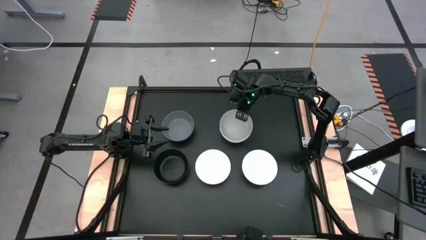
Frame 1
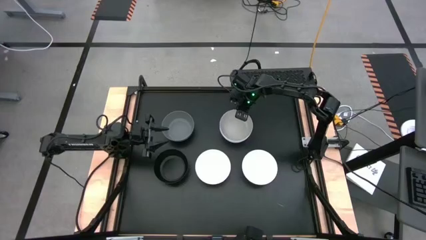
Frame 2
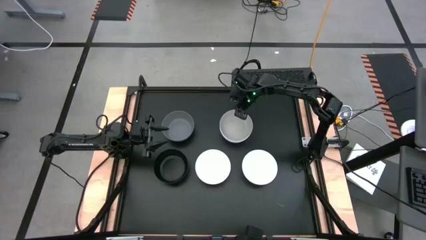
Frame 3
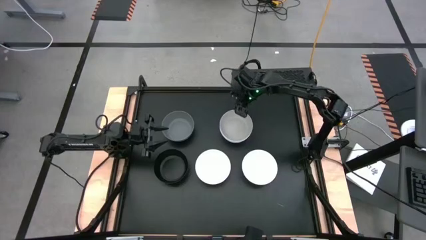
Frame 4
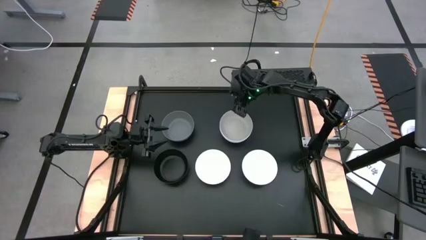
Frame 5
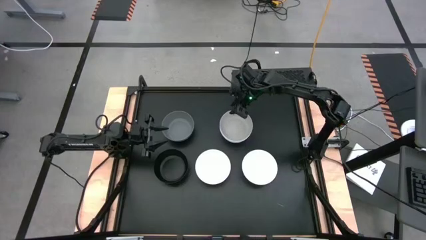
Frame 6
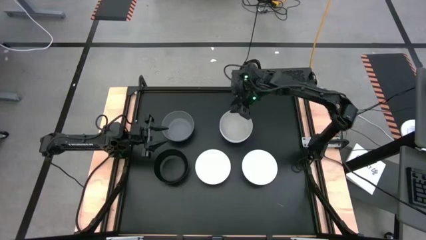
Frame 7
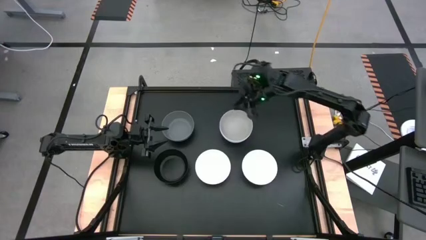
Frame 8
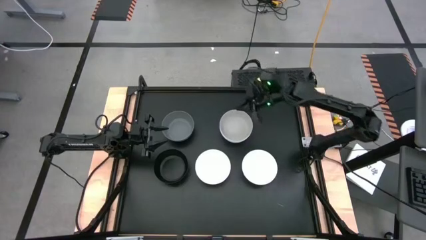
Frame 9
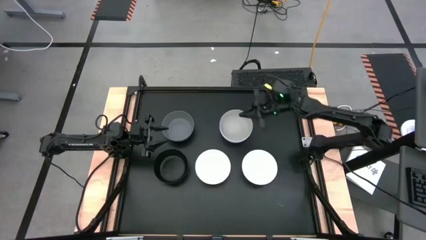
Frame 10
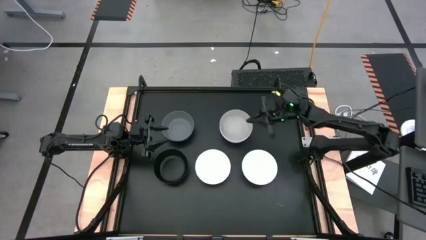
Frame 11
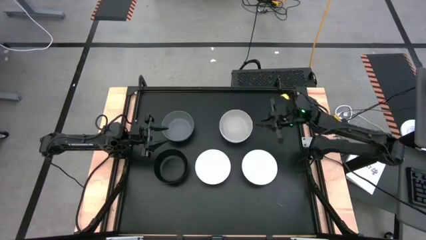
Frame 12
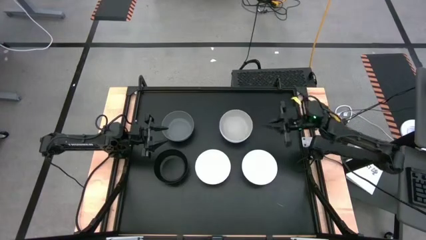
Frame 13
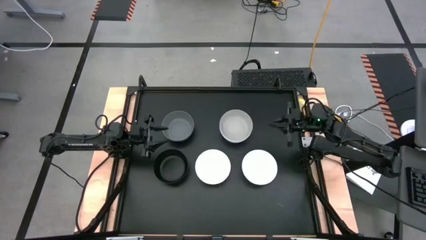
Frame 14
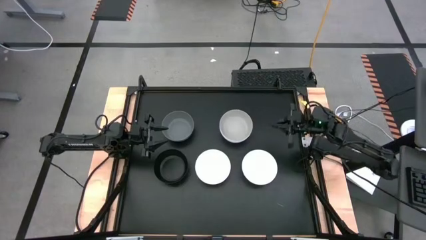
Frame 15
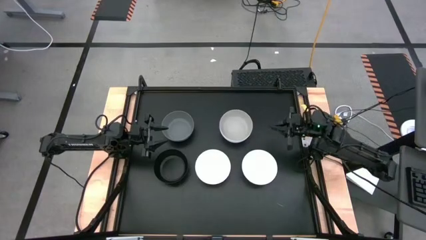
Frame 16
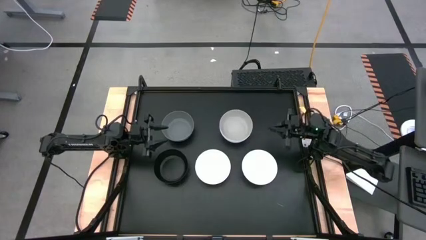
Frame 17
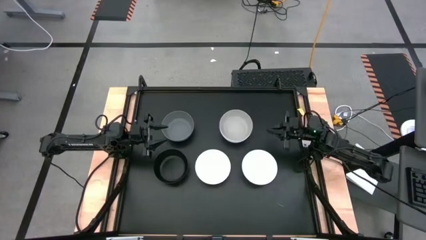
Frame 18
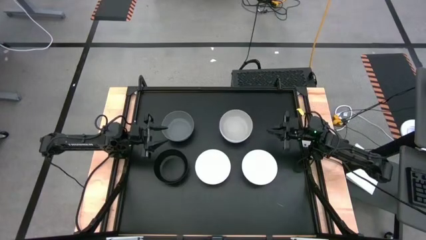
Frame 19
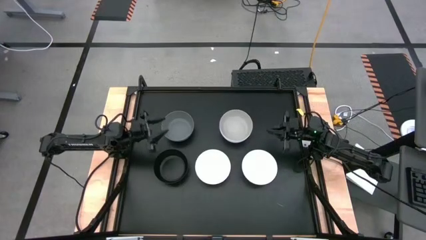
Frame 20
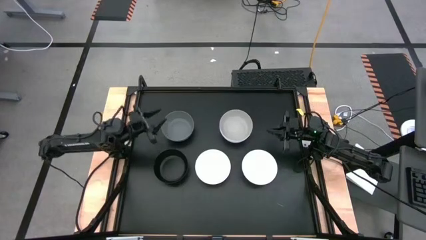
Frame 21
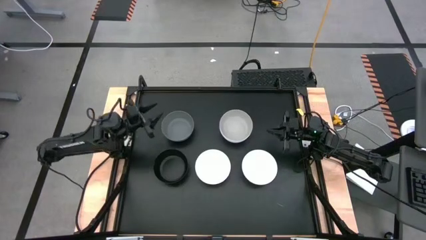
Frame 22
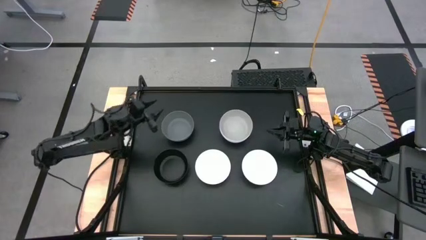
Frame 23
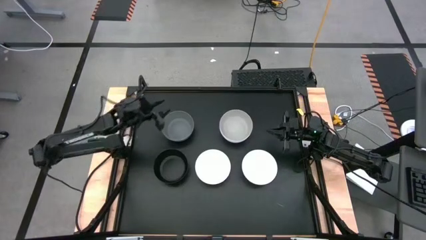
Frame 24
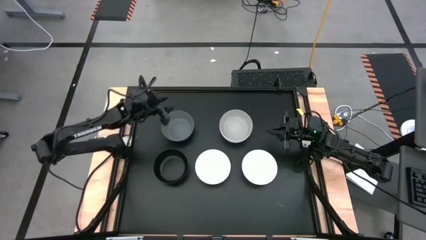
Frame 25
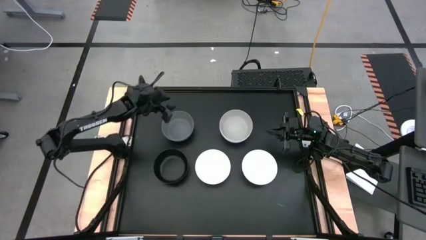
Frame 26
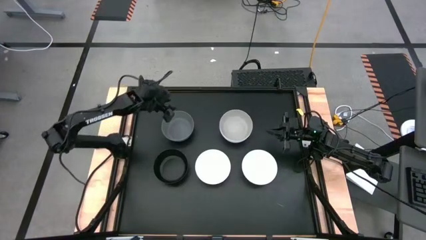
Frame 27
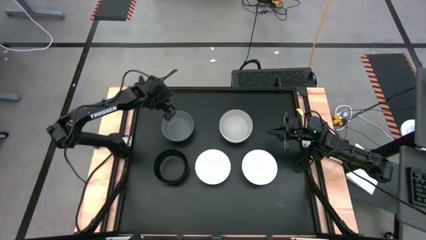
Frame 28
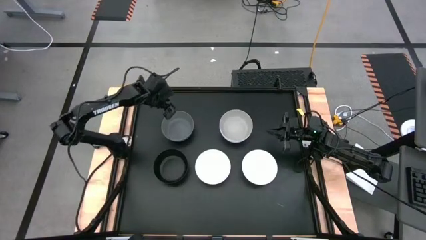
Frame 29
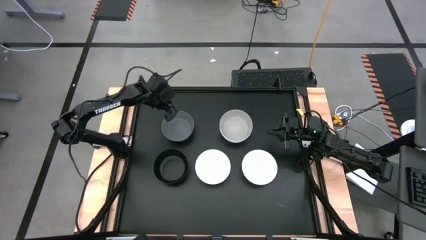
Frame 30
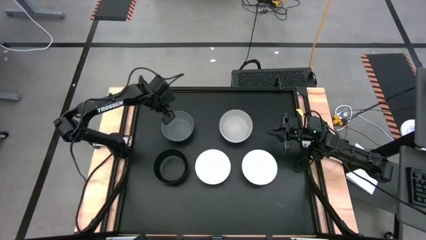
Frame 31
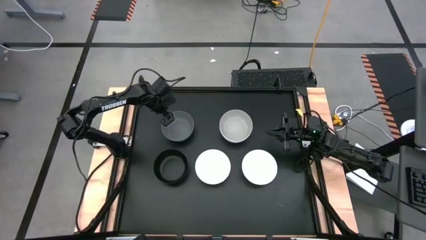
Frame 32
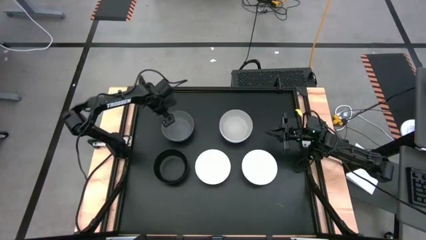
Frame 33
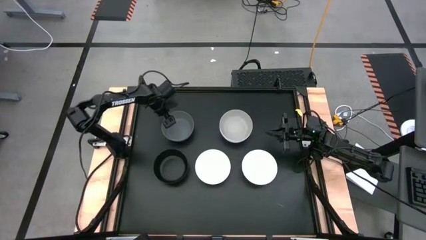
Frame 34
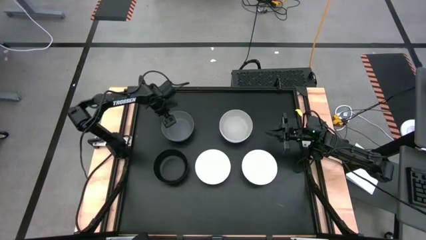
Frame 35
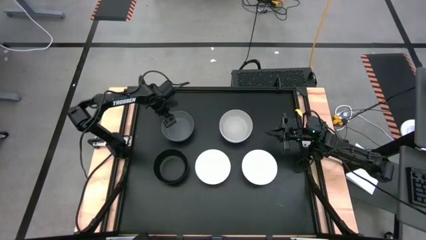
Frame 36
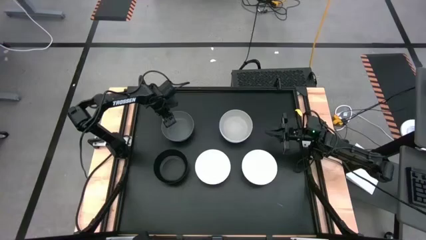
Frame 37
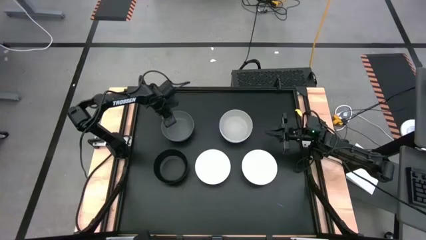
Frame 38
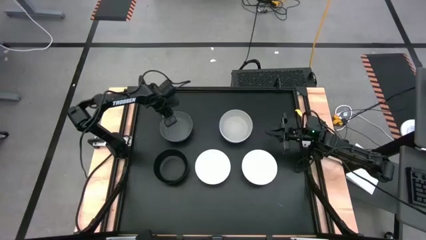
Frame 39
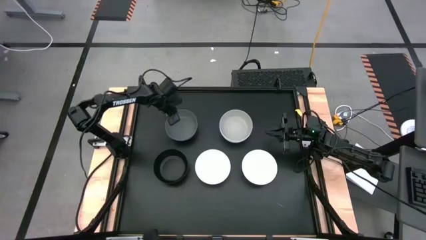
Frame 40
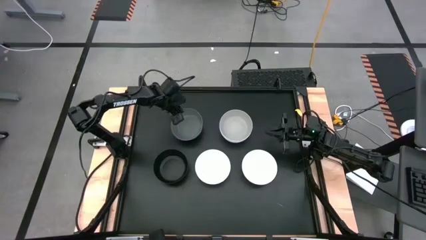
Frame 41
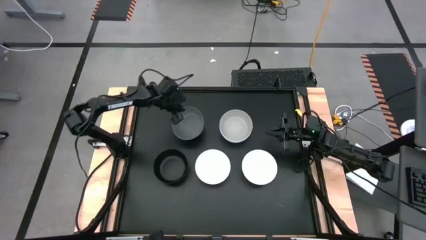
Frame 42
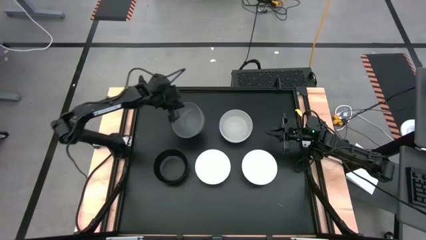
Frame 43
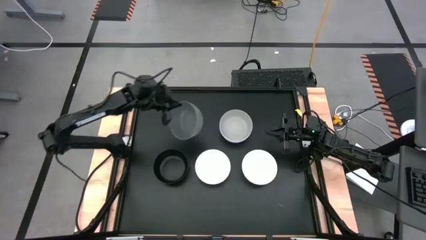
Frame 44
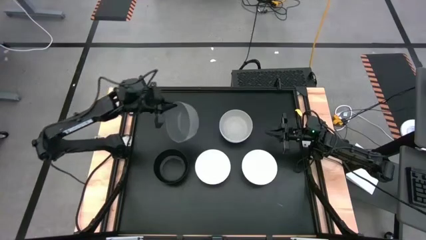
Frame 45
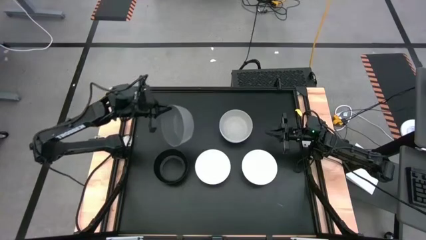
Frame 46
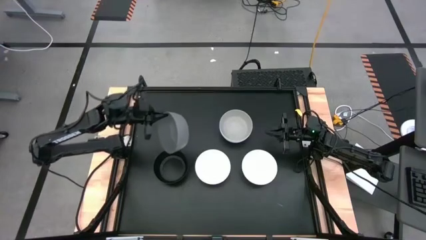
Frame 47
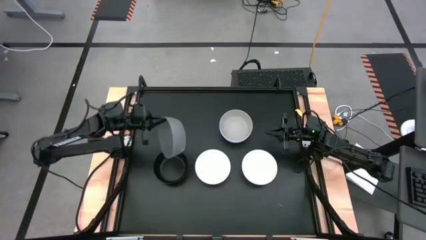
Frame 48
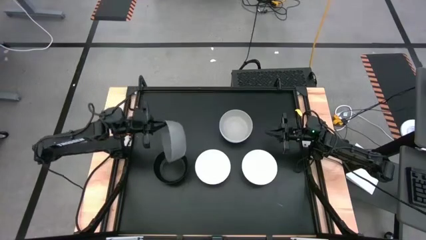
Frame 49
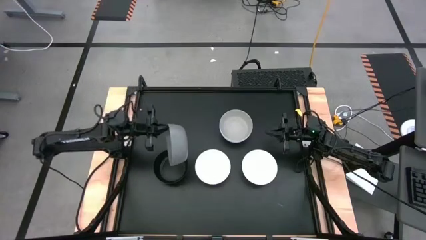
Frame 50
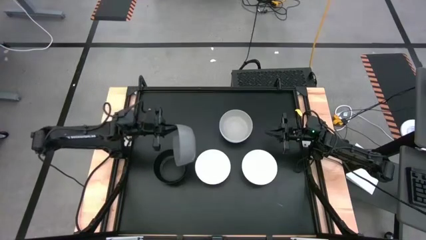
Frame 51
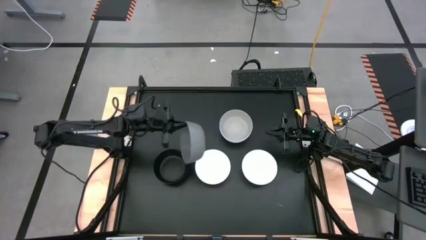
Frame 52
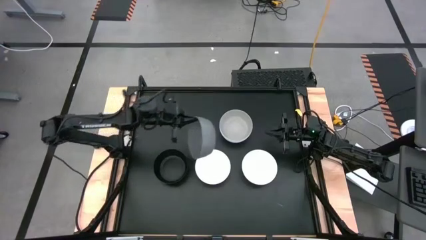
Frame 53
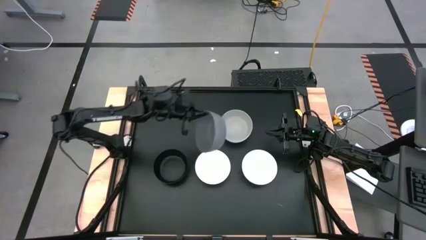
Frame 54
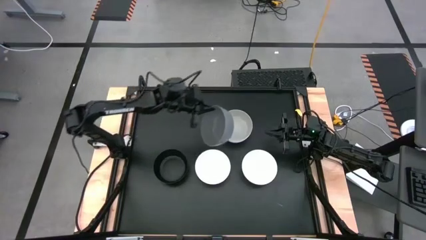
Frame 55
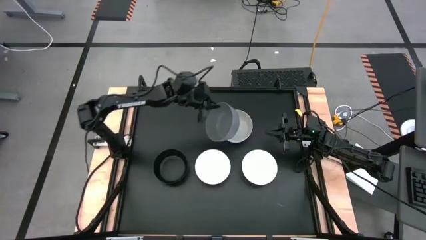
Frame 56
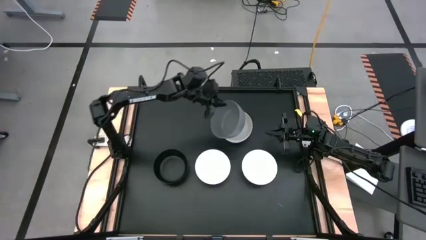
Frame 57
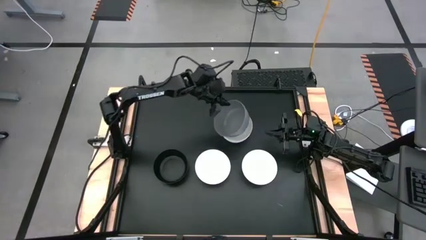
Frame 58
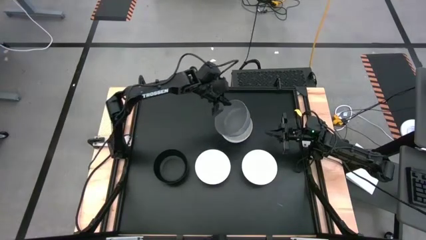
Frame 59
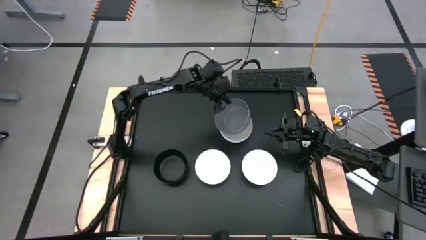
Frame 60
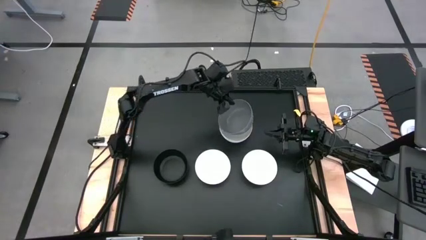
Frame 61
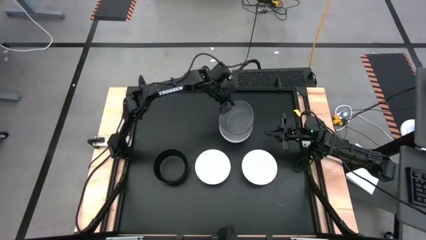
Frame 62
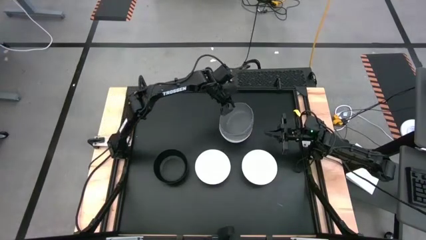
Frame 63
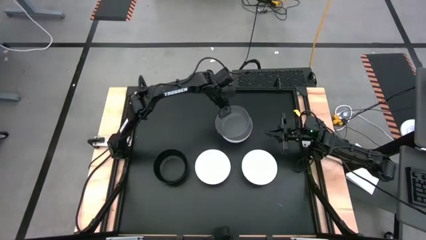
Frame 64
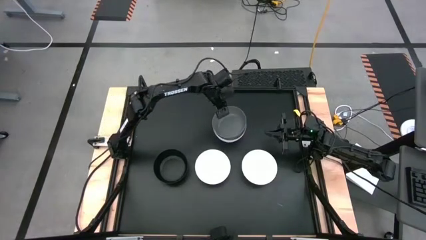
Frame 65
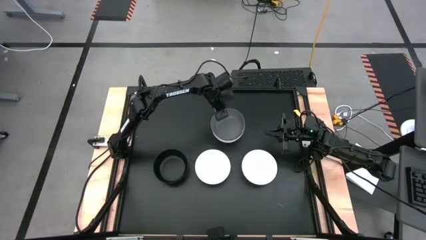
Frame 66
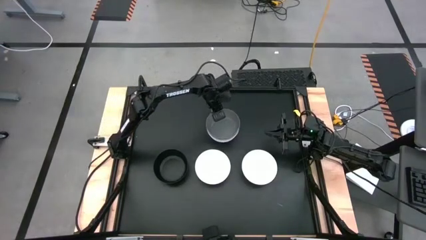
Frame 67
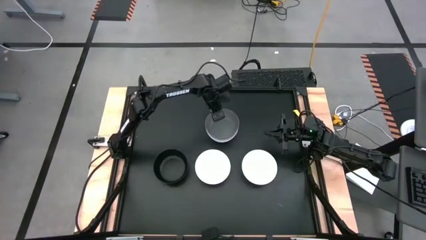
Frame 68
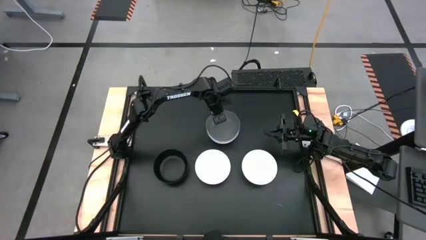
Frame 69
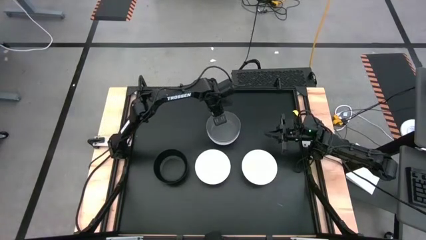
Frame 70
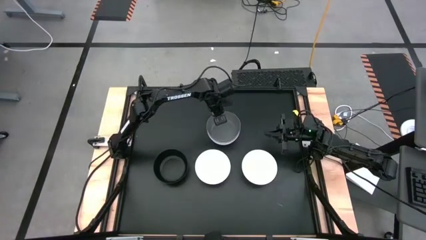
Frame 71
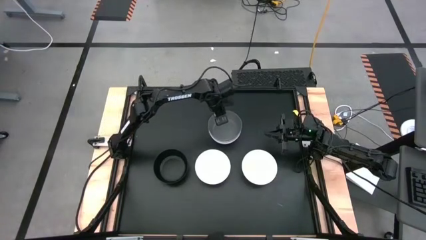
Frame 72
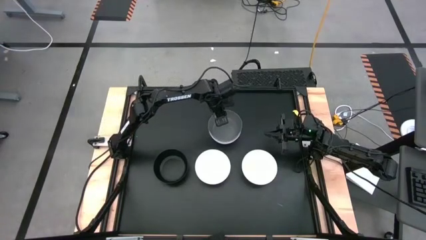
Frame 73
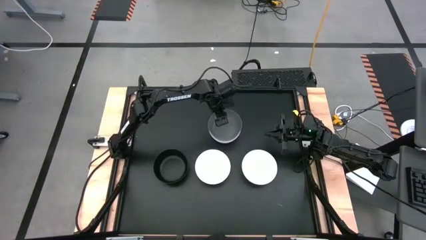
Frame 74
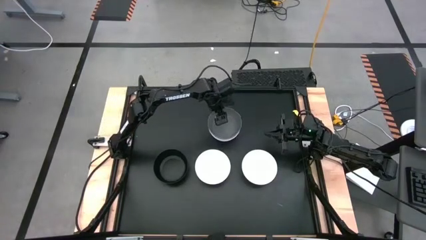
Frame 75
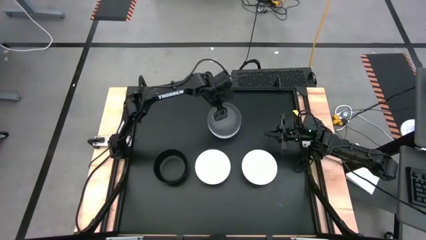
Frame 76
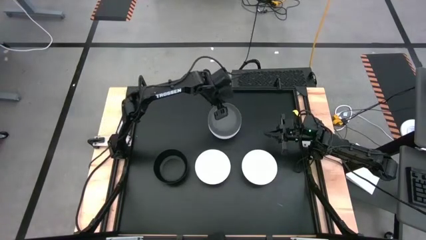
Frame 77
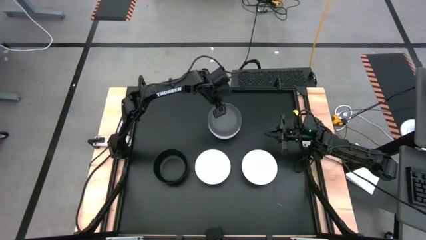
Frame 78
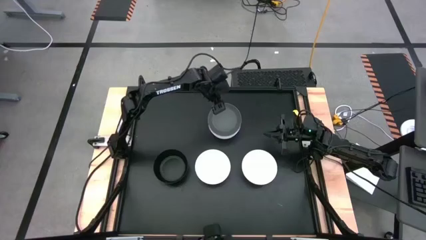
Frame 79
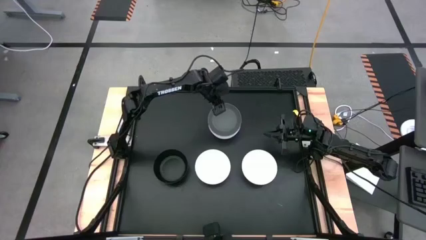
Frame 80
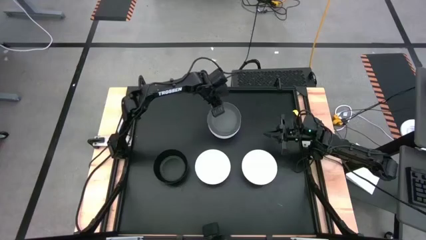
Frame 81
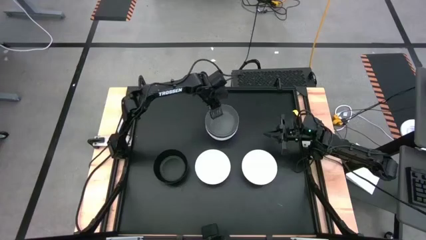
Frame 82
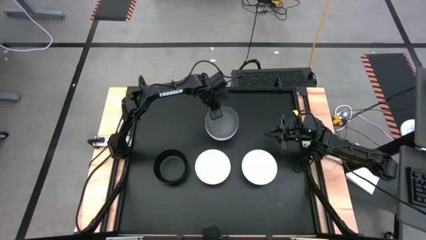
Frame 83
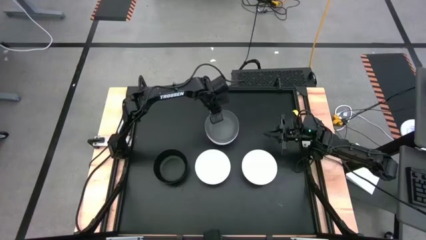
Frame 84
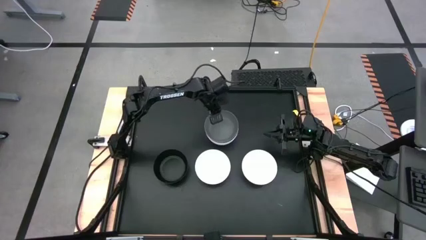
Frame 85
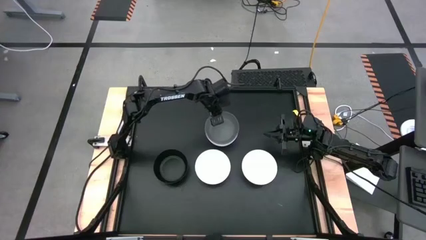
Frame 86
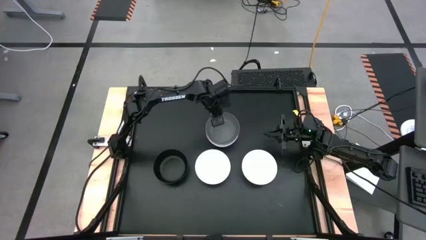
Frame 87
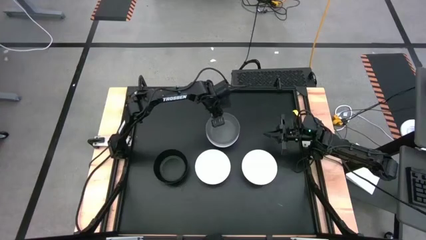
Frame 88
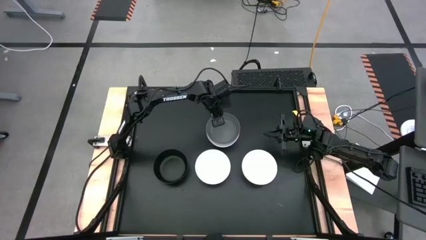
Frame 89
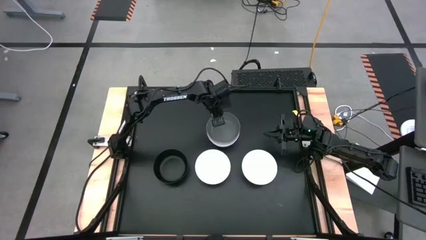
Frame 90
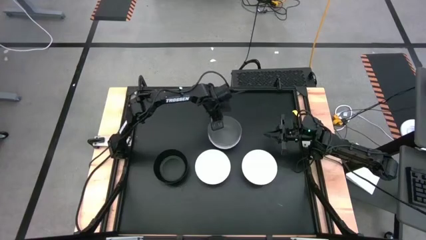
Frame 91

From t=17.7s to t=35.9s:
Task: Nest bowls inside each other
Stack the grey bowl on top of the light grey bowl
